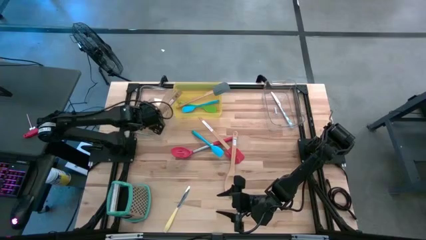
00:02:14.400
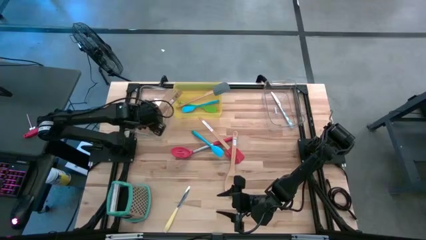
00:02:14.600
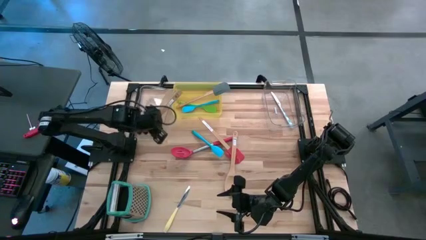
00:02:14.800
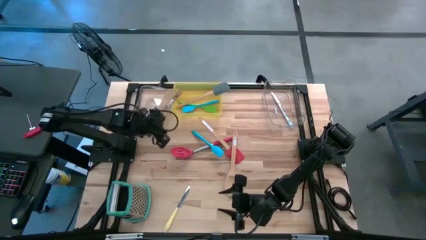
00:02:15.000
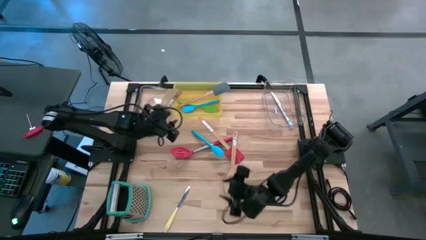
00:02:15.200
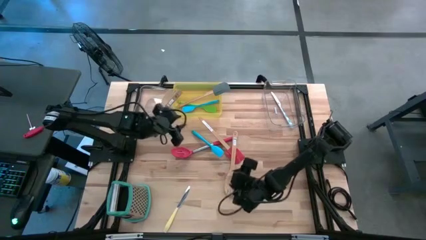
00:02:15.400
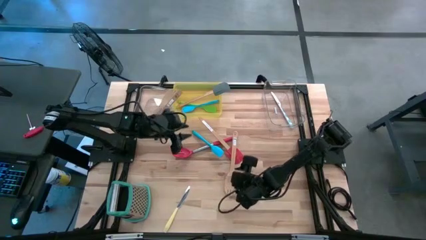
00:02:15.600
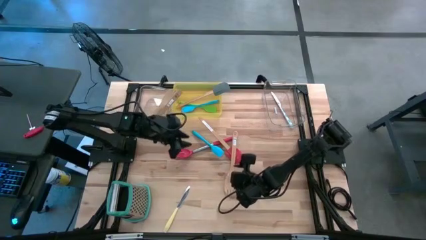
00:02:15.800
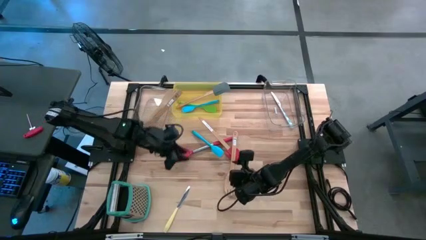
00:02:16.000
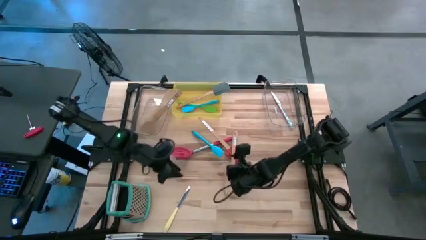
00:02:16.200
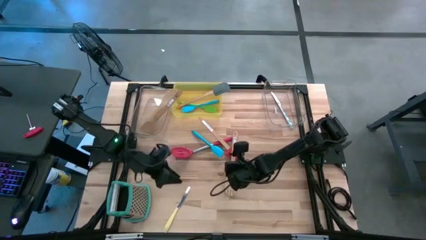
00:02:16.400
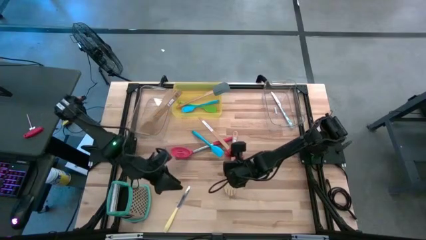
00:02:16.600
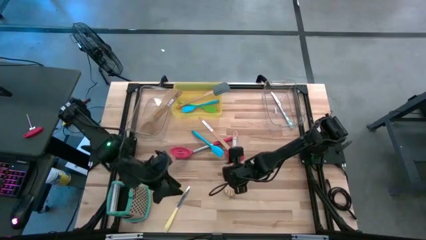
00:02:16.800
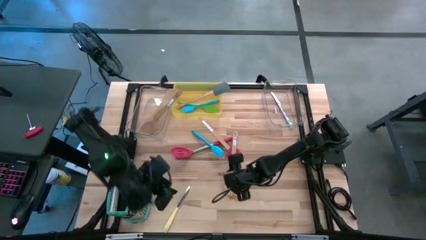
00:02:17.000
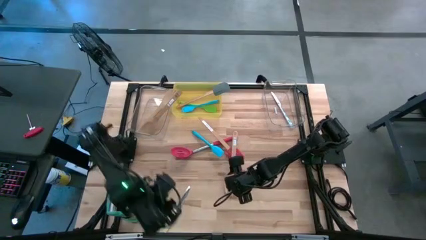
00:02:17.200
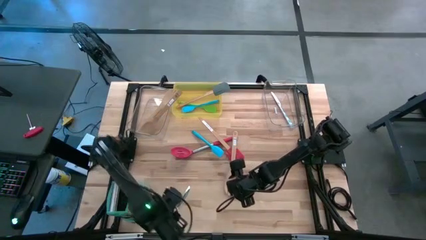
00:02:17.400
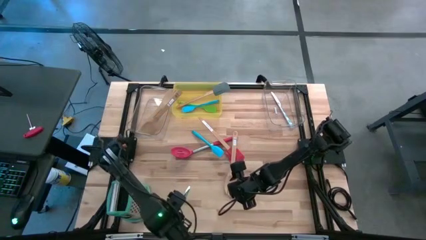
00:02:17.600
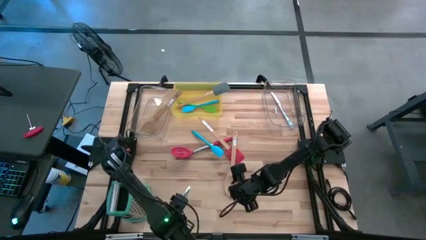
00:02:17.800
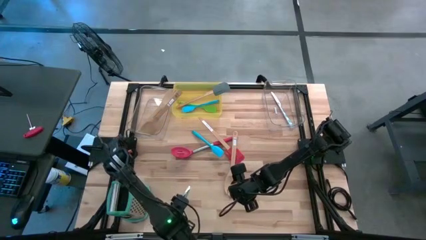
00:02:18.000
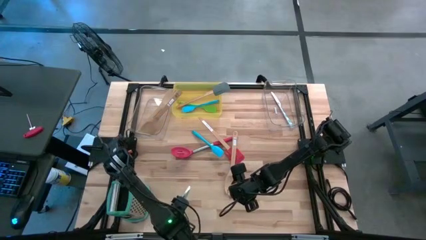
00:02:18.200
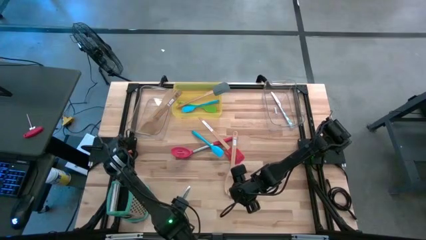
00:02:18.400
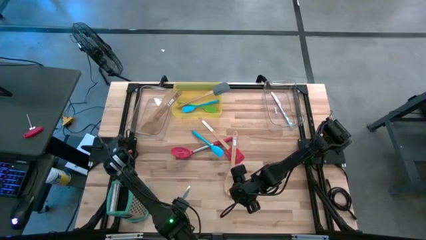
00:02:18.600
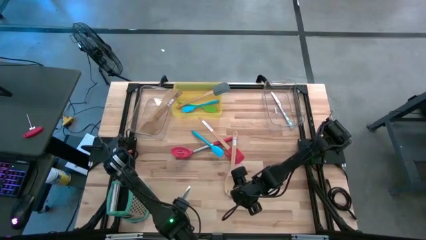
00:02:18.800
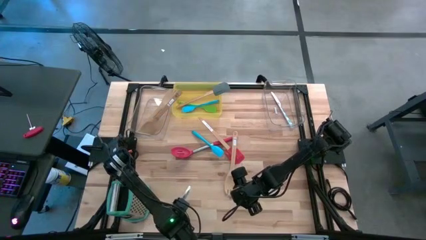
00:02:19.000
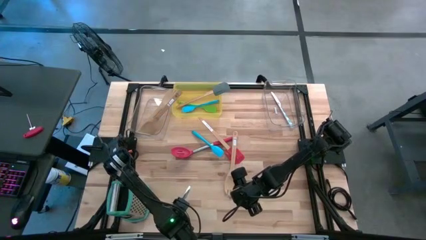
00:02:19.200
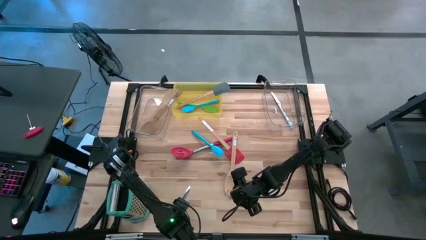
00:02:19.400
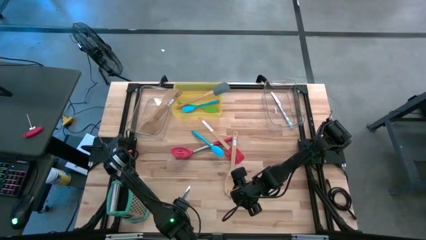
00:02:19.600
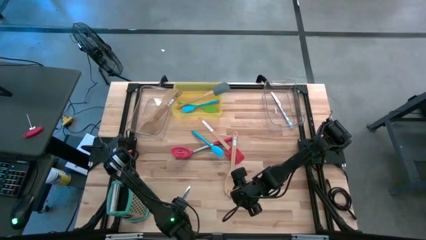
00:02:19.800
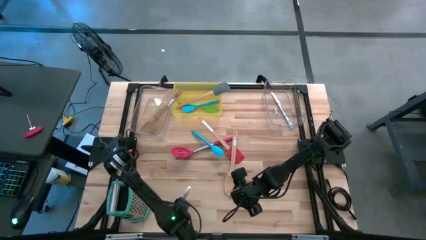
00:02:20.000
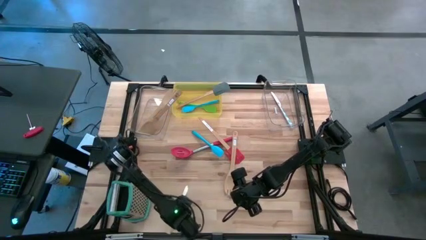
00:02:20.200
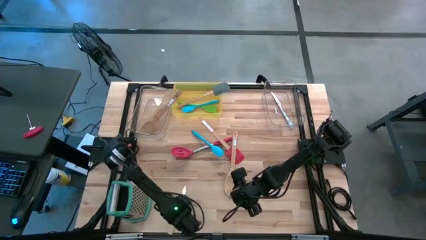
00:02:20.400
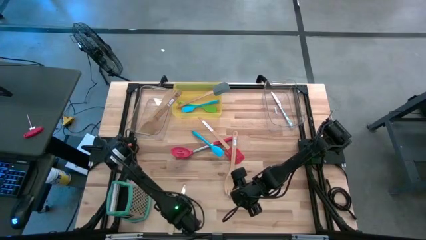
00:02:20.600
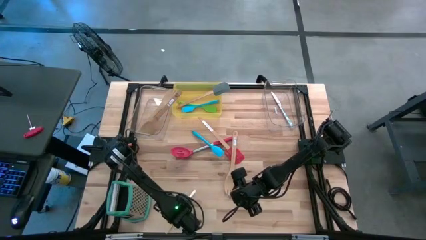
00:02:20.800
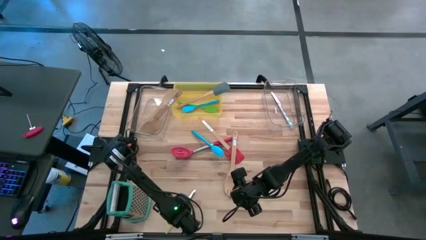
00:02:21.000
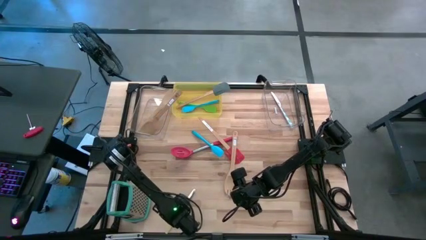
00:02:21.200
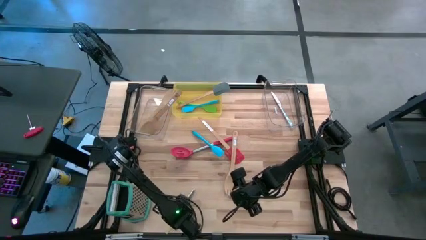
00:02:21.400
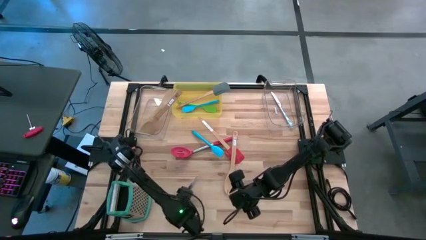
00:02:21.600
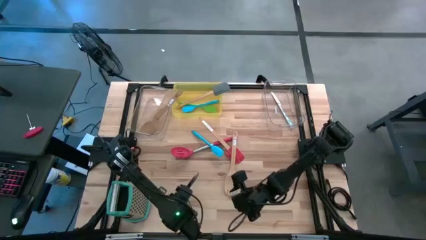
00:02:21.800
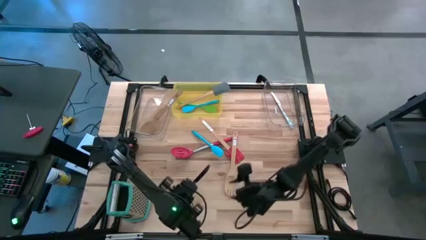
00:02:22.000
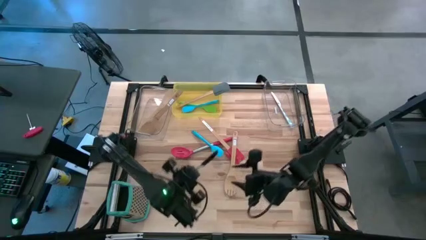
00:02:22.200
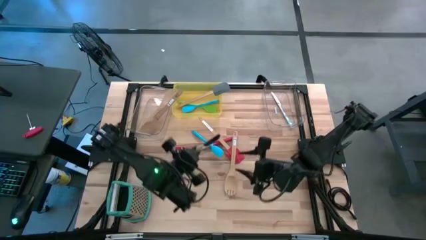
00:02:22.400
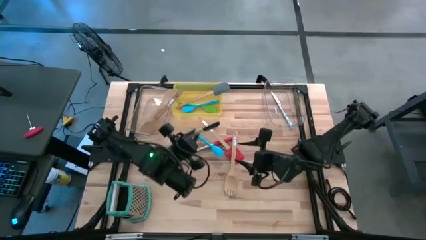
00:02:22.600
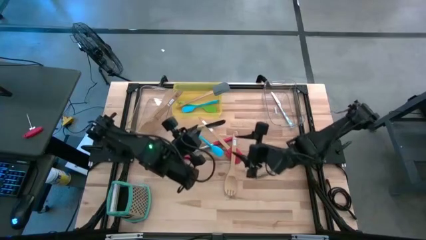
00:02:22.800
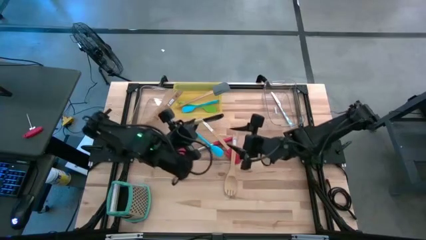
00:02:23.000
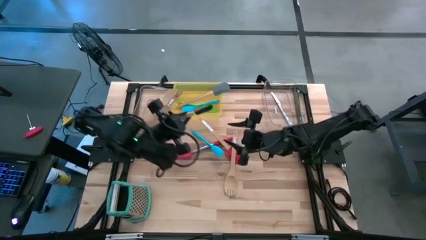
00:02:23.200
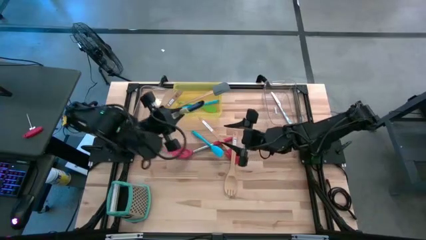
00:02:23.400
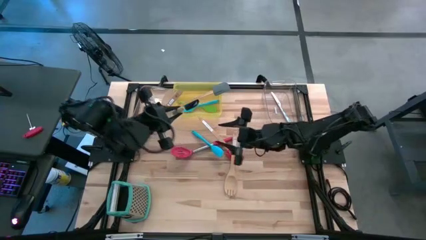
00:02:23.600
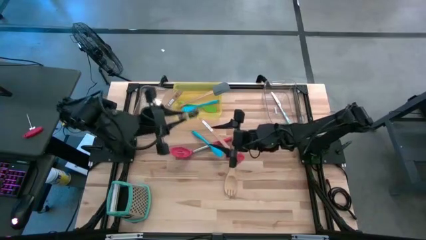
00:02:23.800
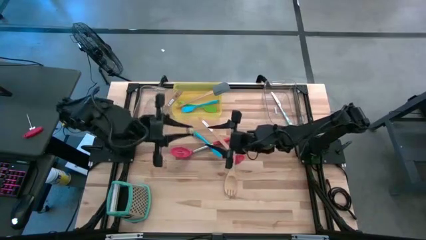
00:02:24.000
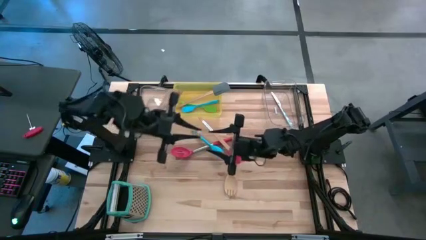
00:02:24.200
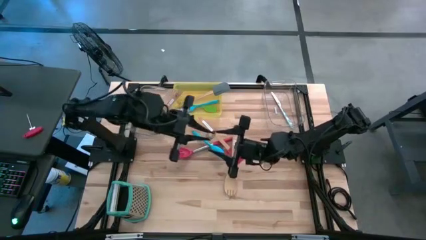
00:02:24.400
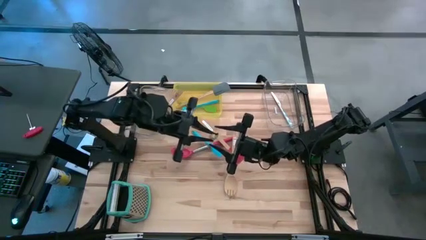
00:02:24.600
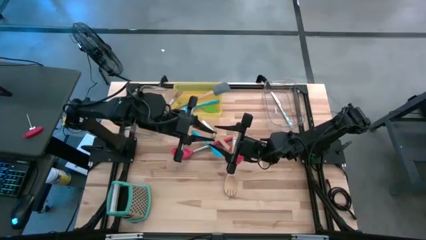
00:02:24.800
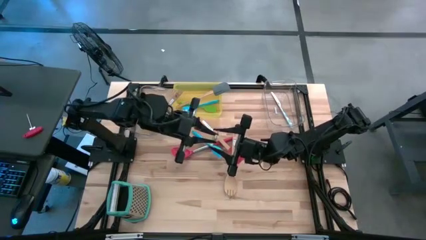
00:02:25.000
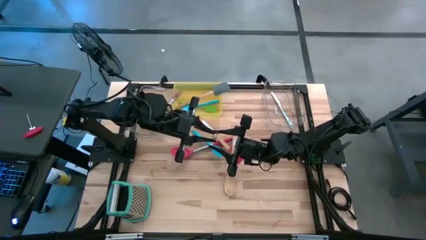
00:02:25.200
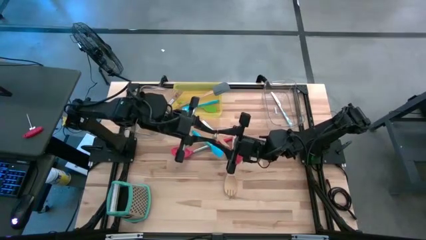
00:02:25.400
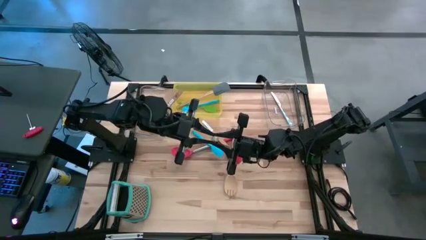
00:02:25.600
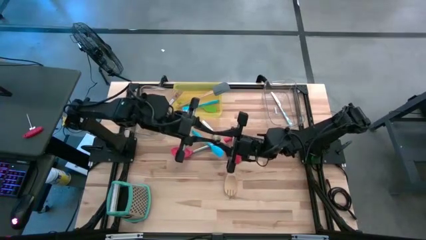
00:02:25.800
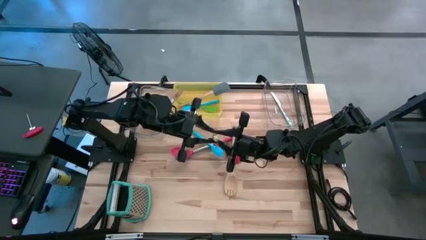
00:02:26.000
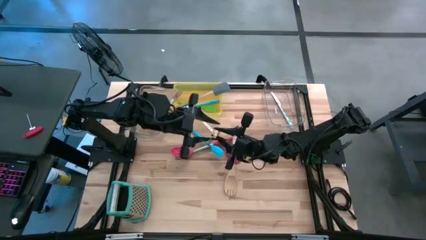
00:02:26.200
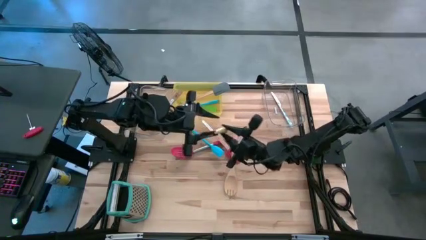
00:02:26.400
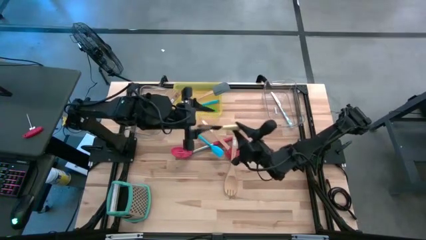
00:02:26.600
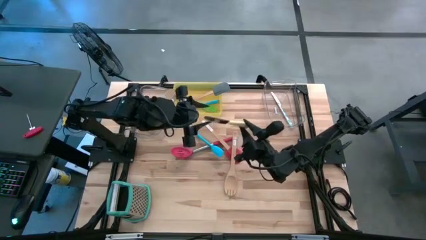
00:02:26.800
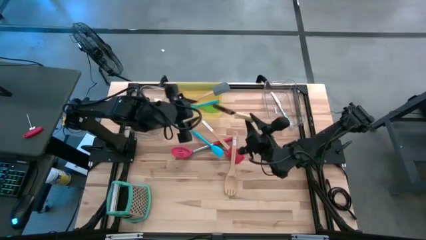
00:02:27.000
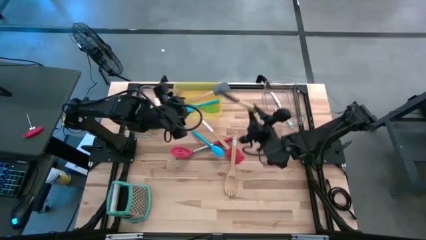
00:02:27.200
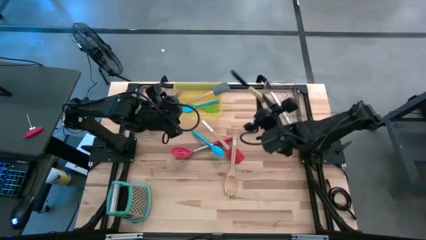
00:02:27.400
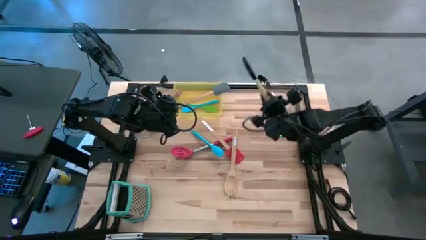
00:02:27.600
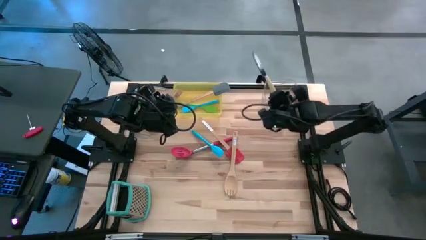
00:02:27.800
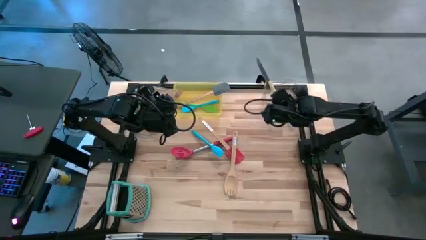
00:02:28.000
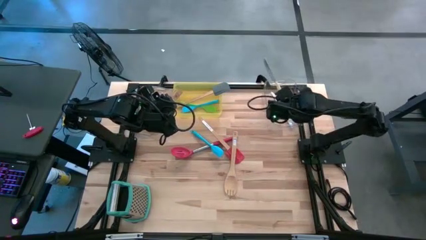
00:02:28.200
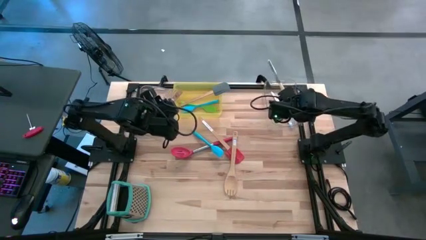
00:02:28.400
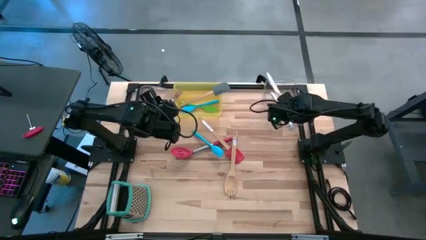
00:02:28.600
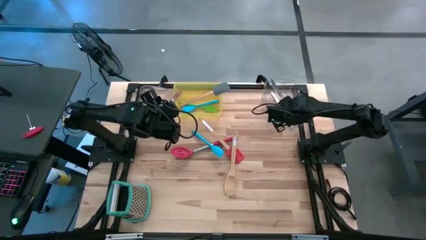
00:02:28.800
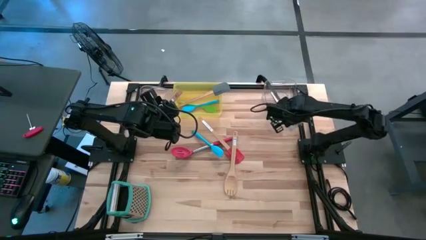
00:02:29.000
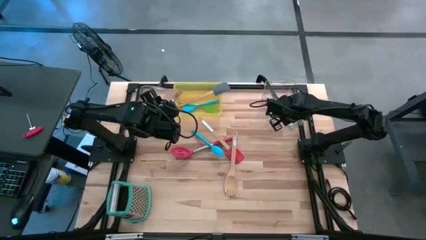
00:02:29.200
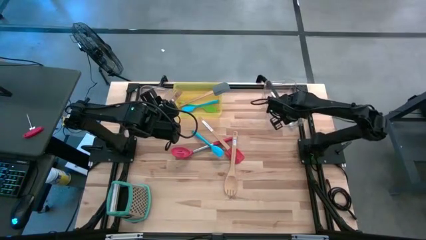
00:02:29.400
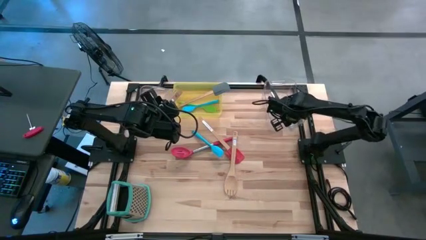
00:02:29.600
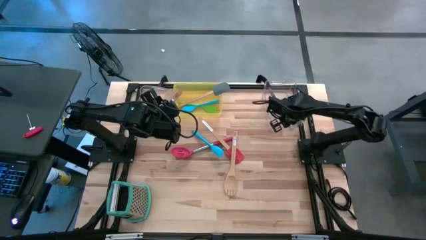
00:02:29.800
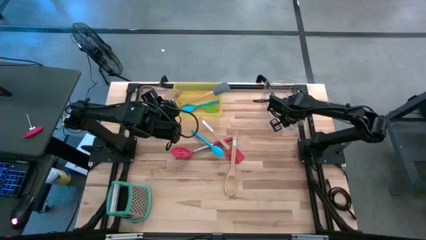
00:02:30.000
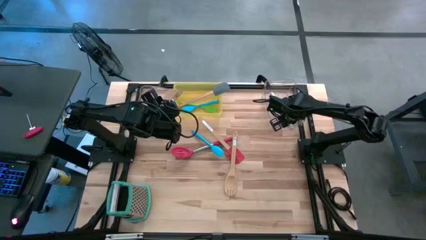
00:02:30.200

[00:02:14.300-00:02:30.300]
Task: Pick & Place Kitchen Items
Put the yellow table knife into the right transparent bin
